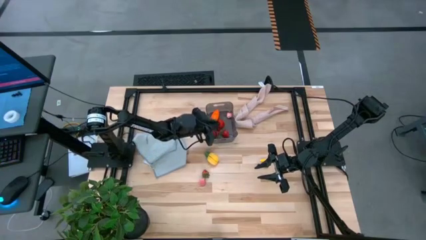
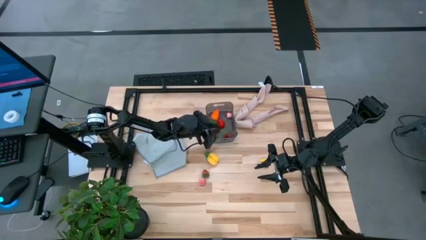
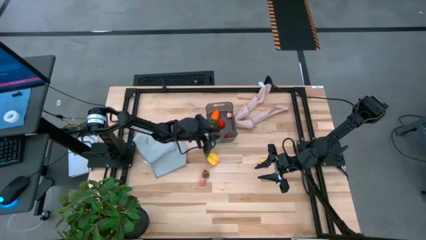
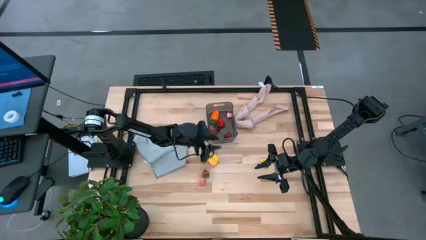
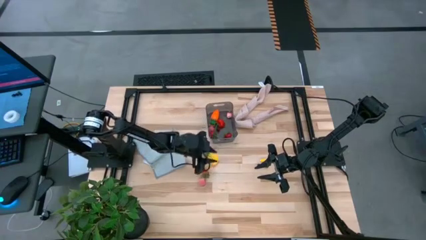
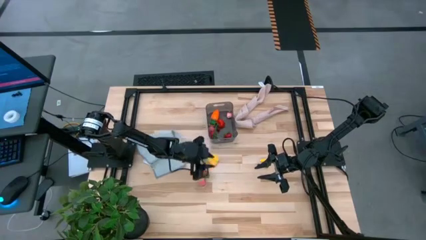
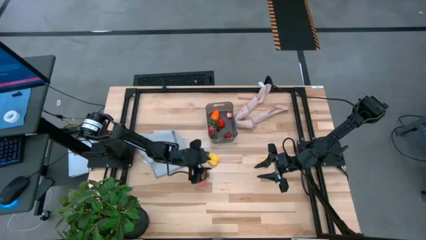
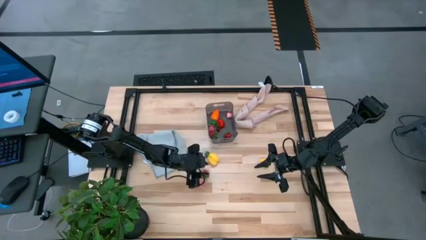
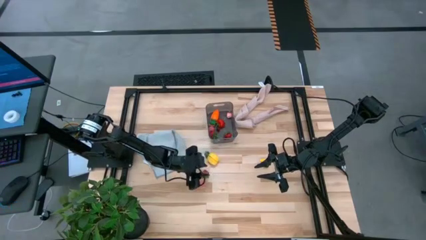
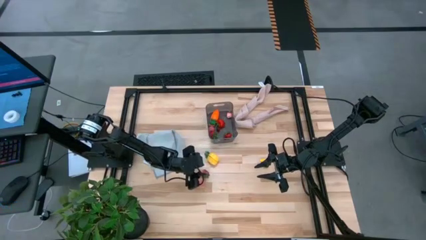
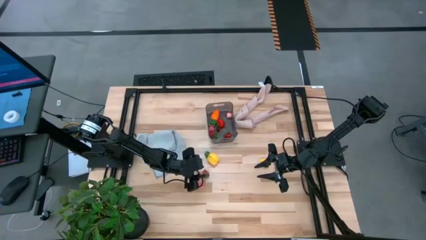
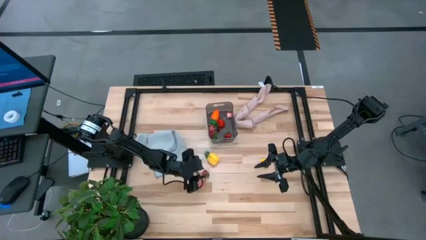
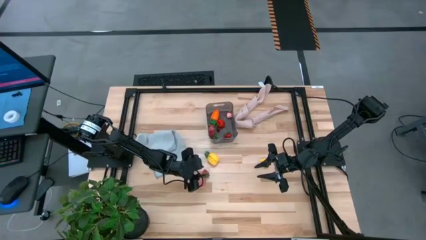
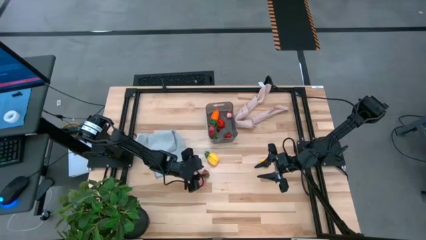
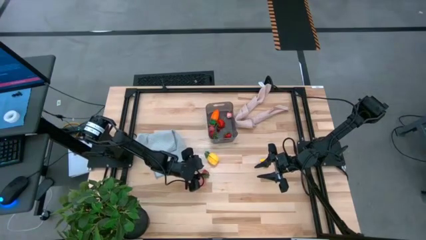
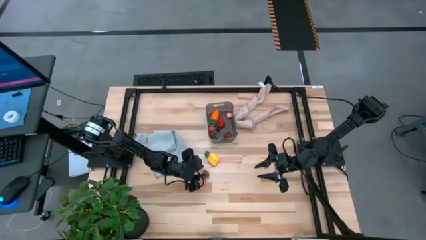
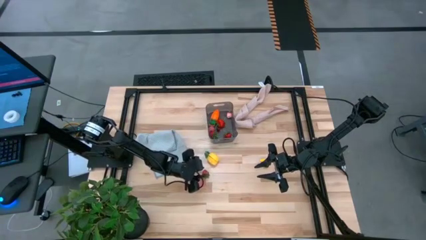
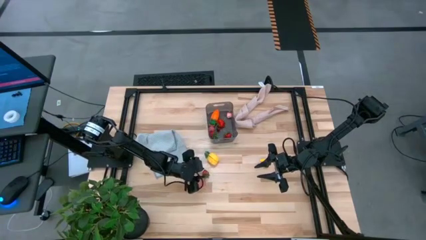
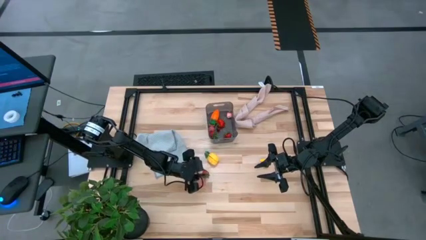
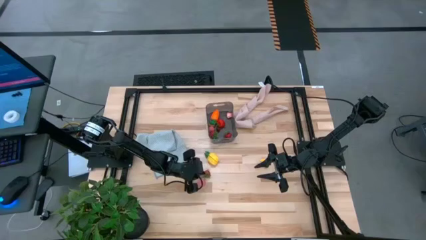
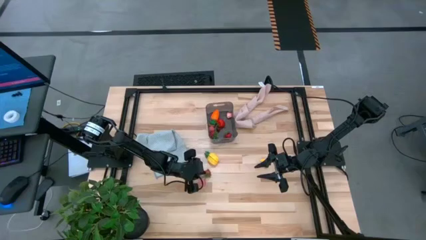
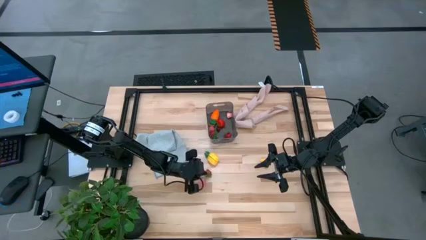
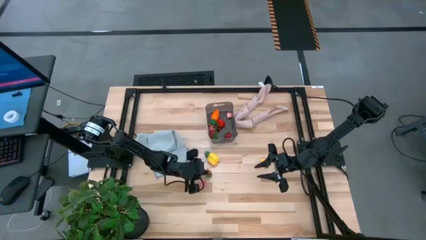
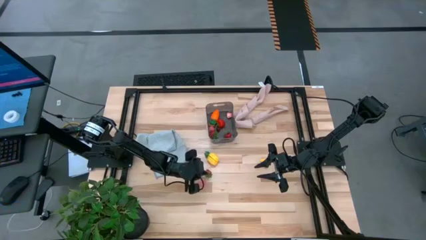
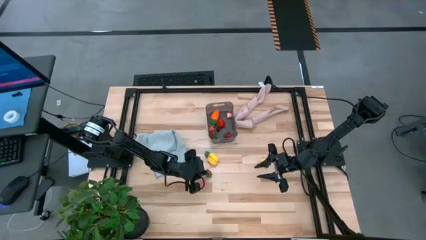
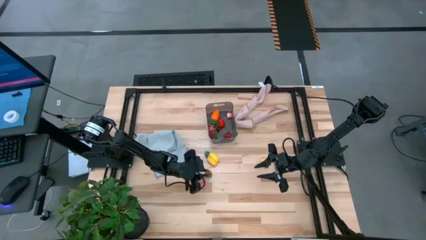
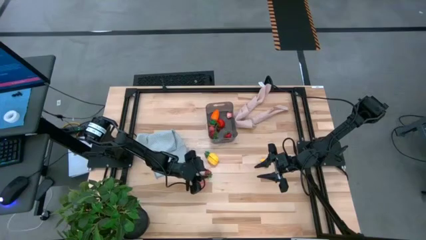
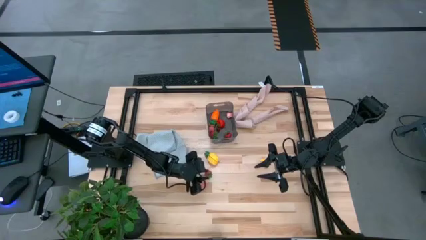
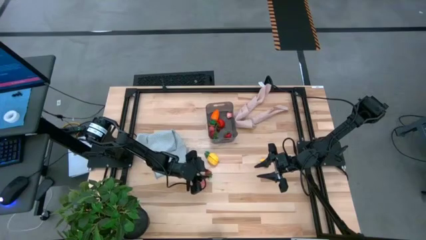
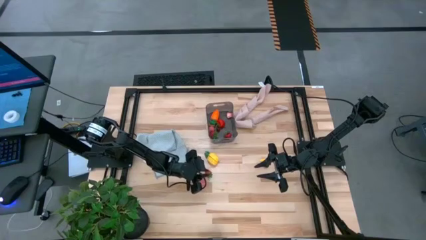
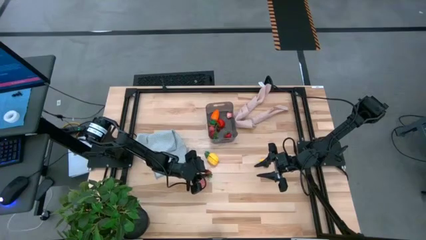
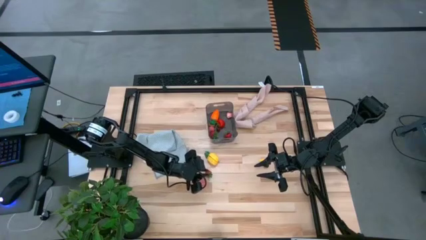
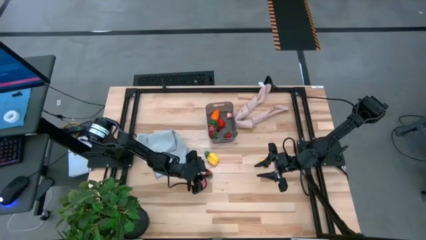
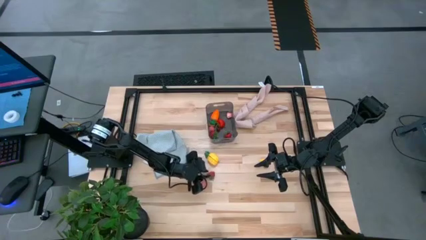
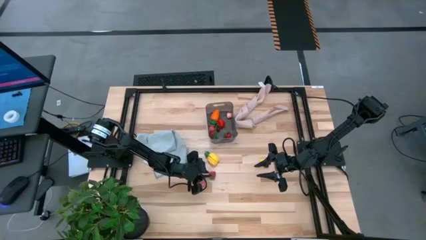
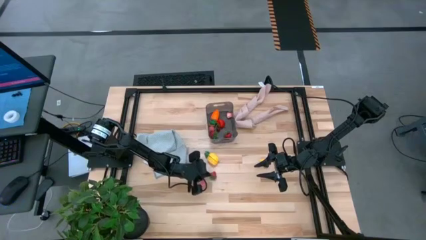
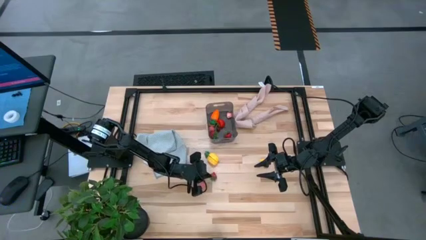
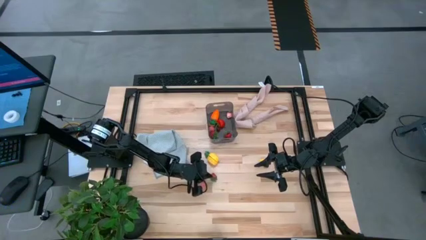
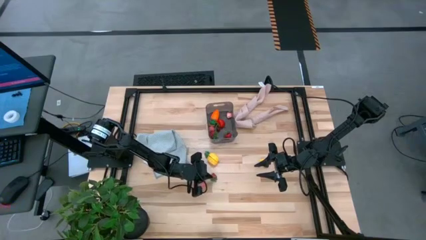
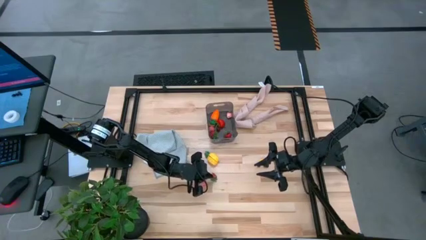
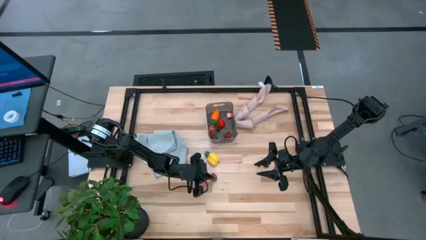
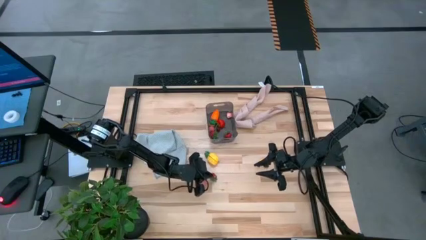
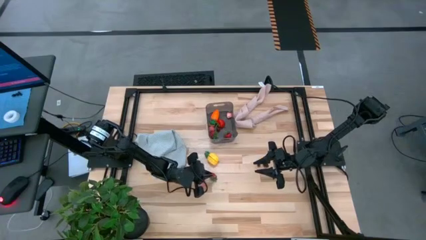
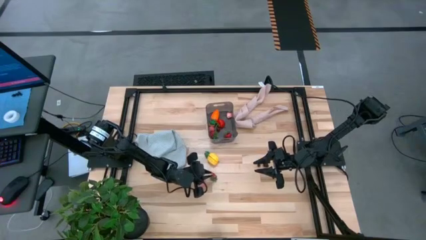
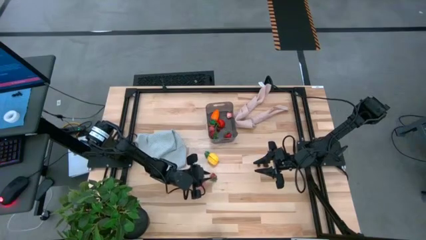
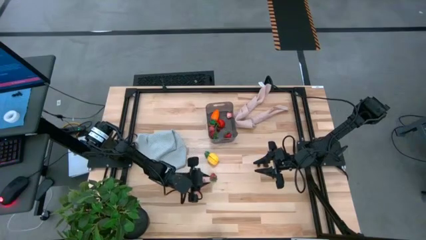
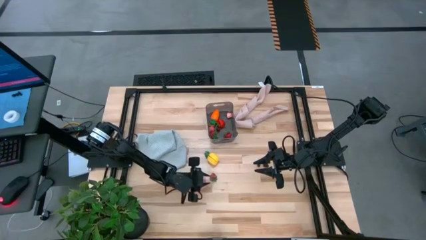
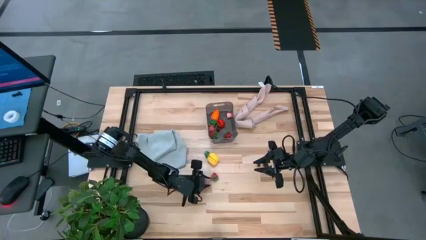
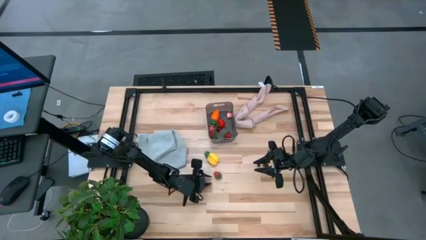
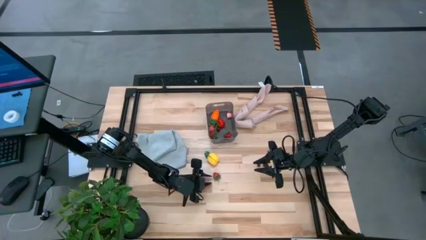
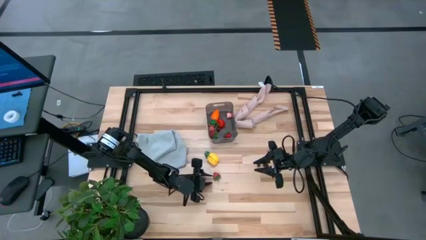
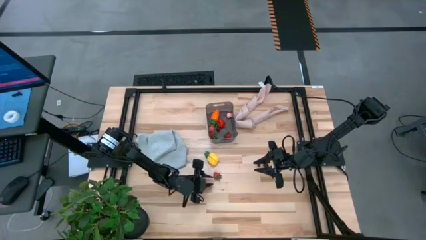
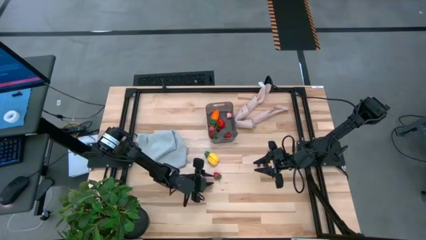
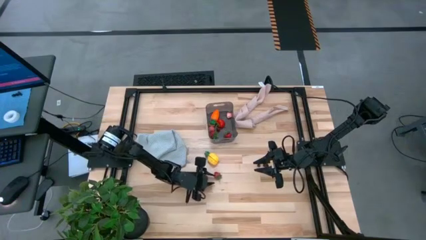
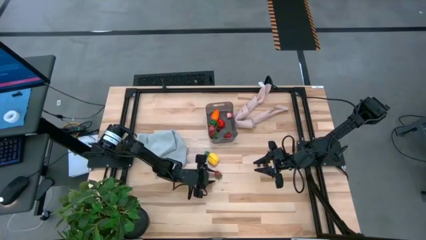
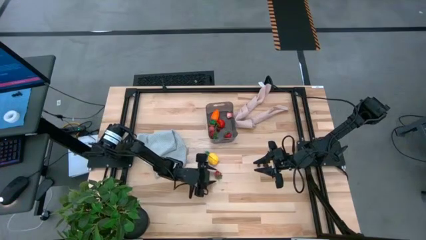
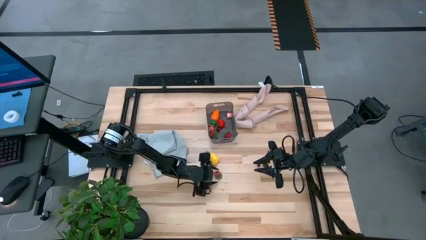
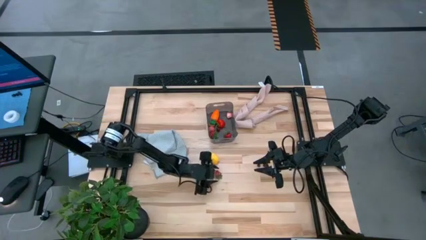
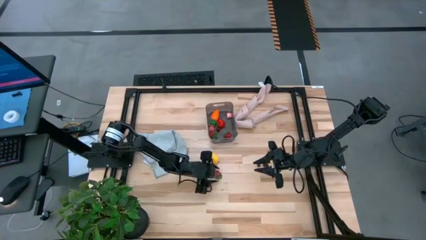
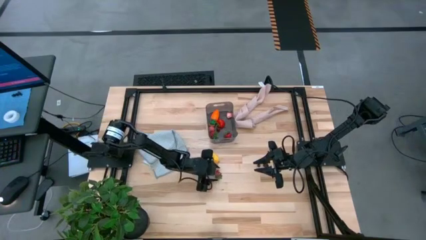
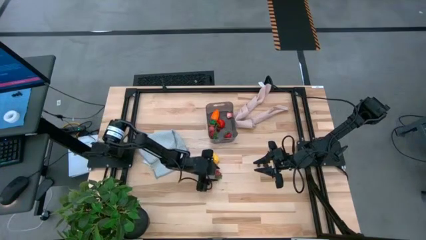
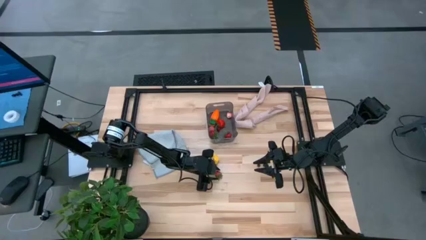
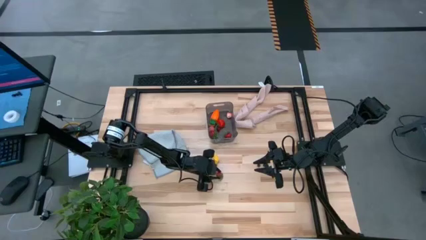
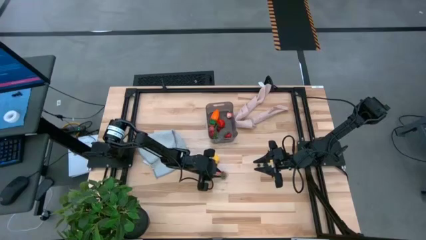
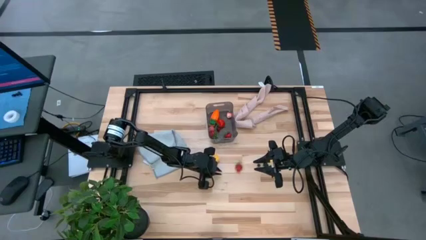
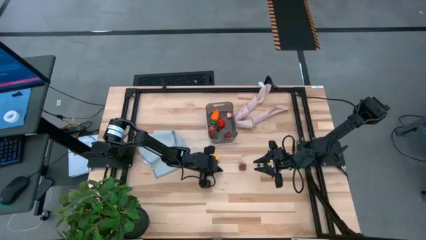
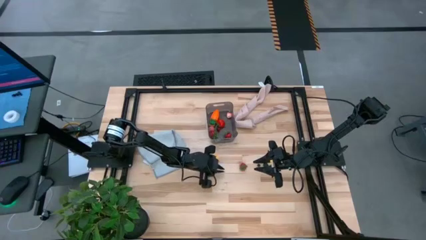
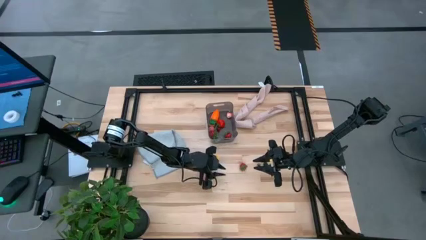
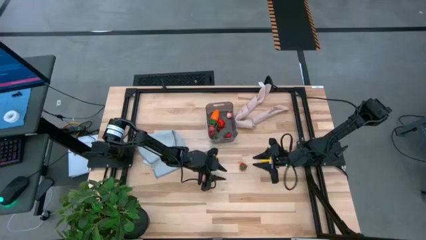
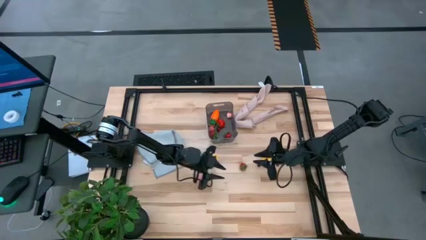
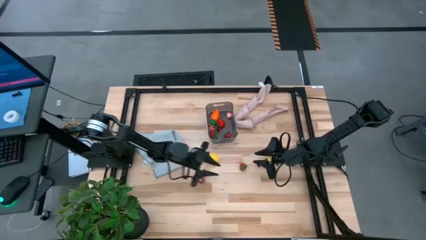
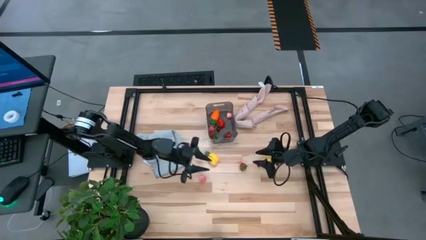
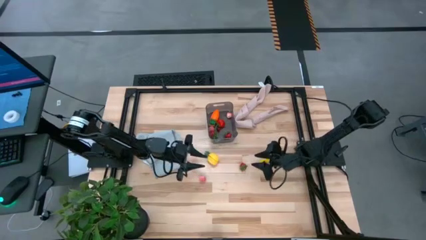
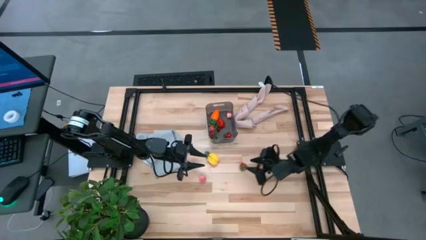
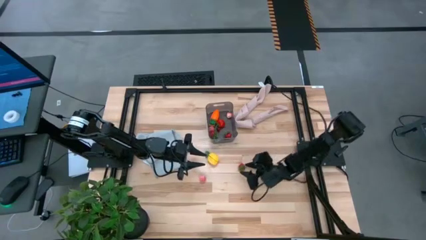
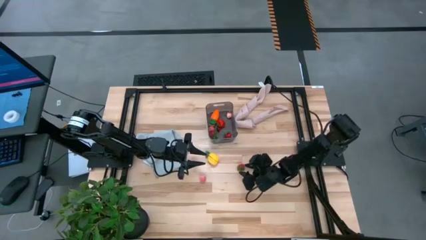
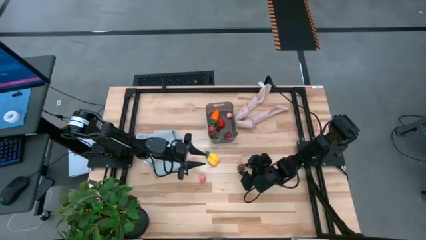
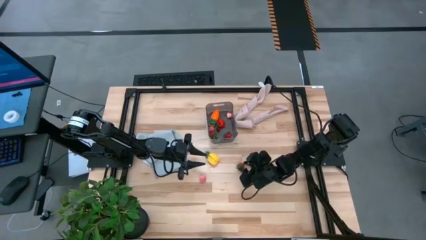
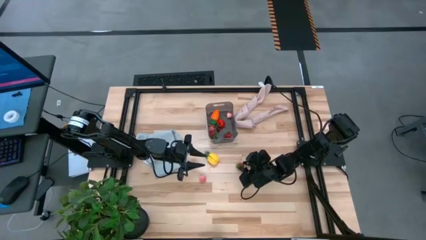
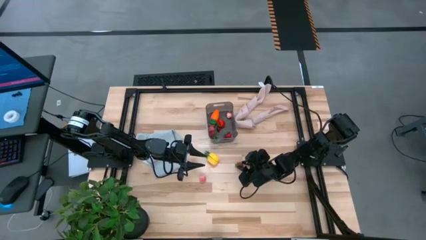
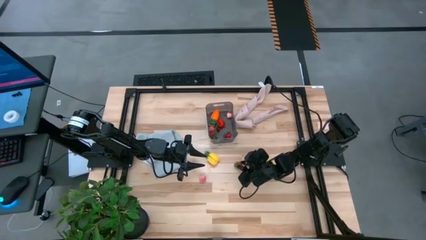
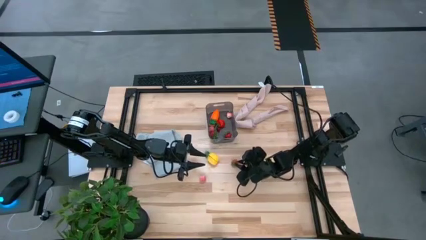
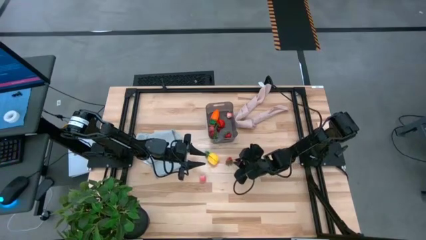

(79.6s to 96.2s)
Task: Pick and placing Produce into tupperware
Put the red strawberry into the black bin
